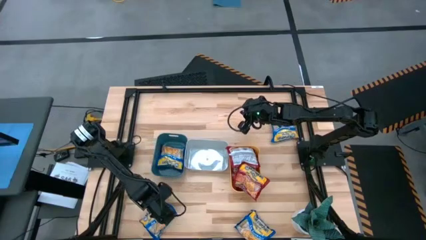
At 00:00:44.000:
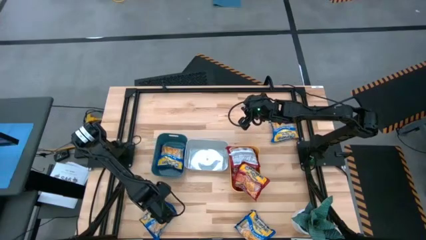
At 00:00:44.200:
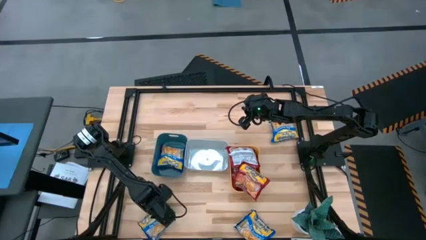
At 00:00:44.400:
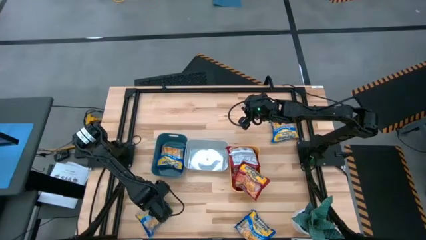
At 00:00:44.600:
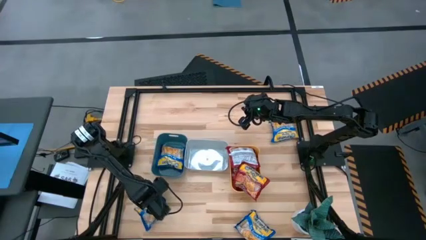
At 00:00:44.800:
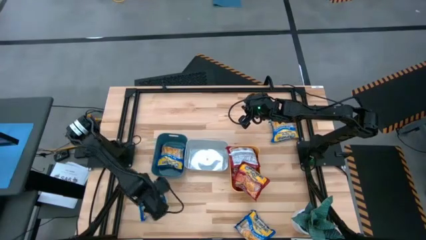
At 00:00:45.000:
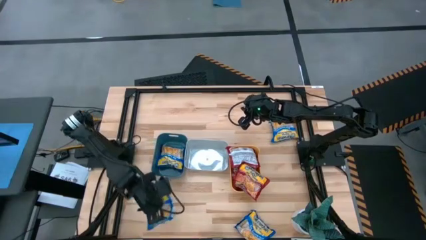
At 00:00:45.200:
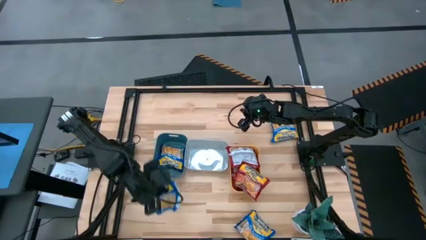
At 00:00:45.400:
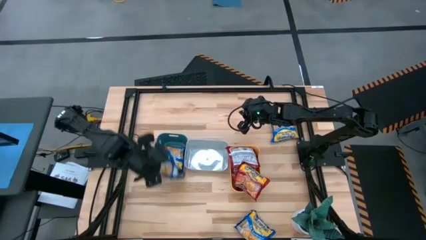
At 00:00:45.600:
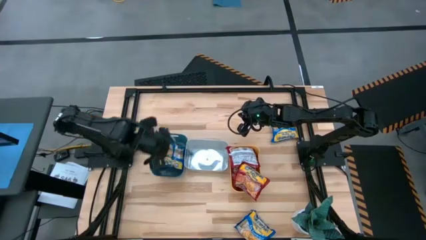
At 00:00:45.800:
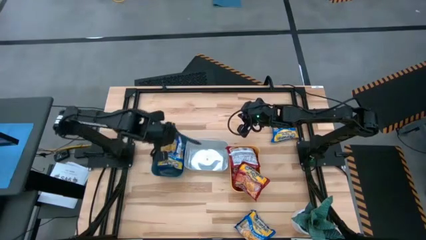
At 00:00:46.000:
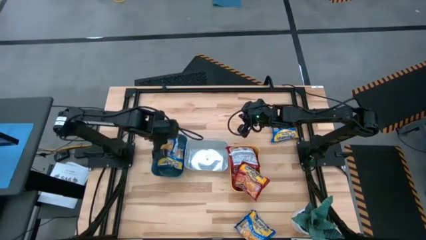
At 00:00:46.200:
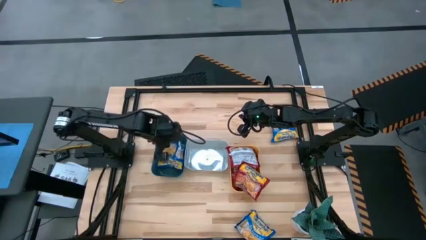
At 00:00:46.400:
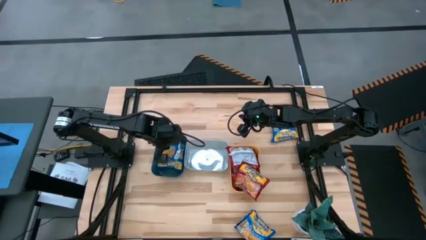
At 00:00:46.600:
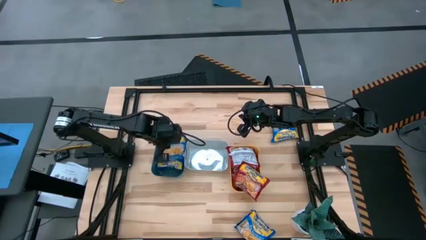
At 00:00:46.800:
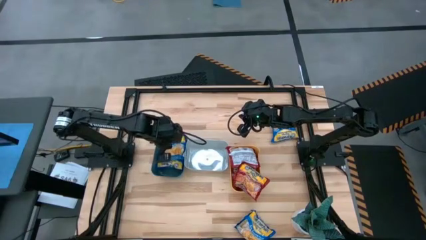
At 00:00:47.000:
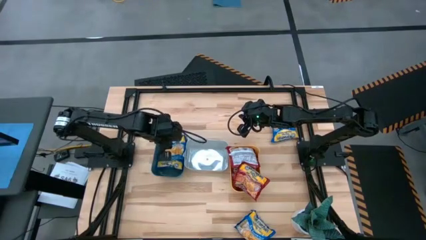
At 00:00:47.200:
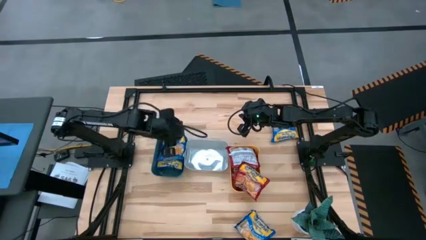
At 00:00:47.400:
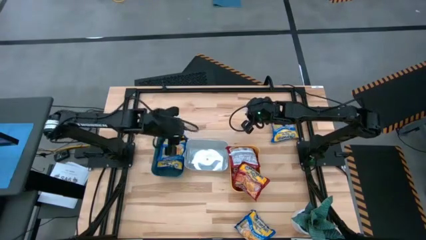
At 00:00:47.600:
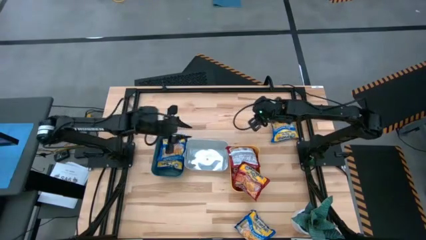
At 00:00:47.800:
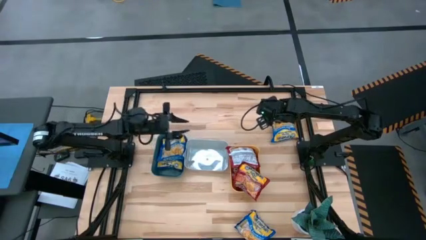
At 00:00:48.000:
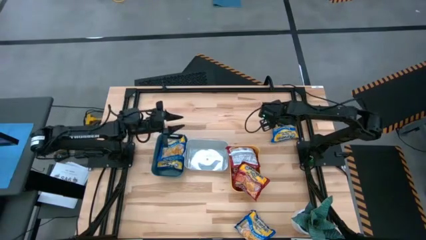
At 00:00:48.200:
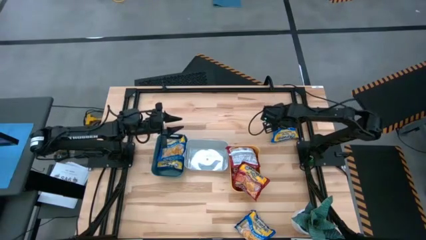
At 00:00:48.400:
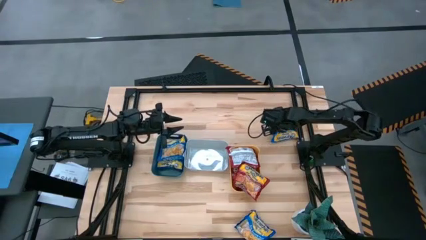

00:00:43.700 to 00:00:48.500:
Task: Sort Maruchan noodles
Put the left blue noodle pack into the green bin

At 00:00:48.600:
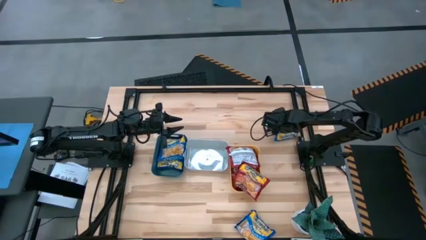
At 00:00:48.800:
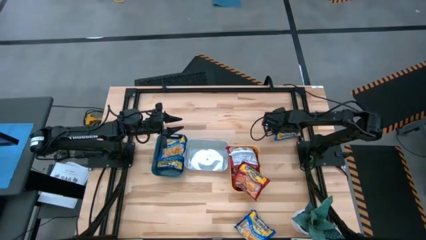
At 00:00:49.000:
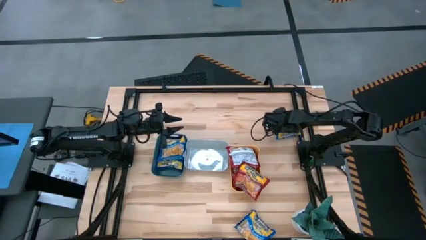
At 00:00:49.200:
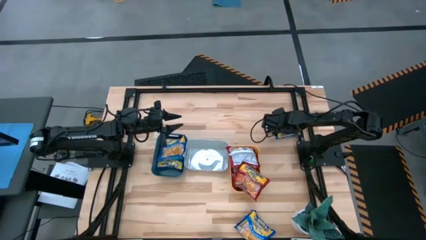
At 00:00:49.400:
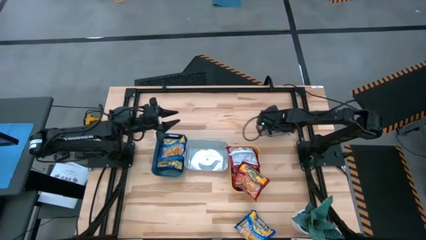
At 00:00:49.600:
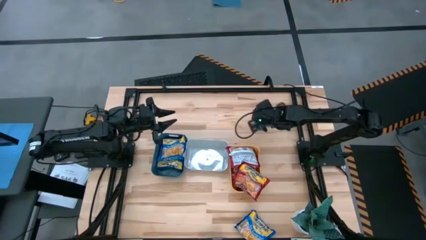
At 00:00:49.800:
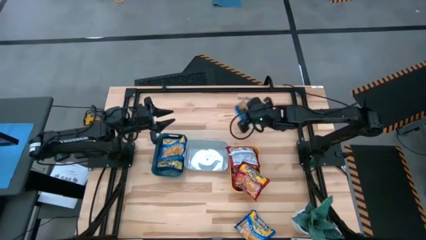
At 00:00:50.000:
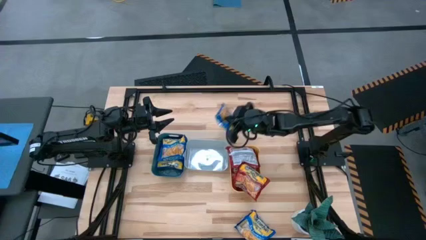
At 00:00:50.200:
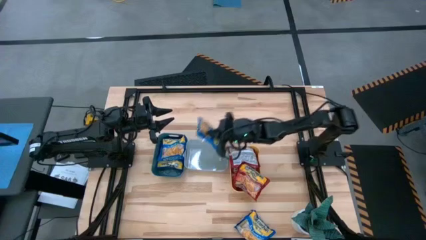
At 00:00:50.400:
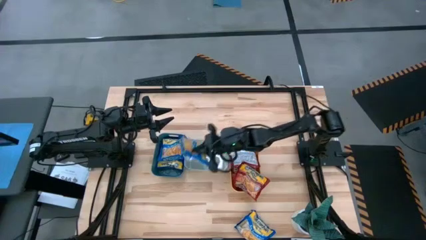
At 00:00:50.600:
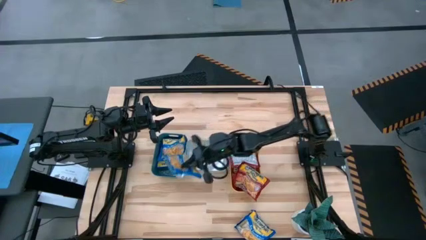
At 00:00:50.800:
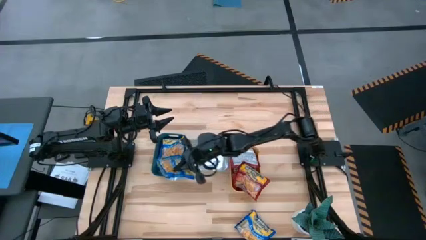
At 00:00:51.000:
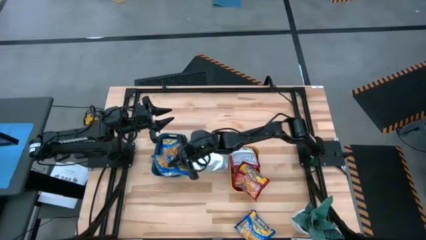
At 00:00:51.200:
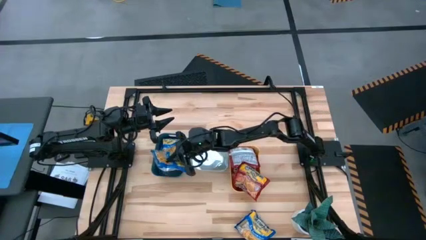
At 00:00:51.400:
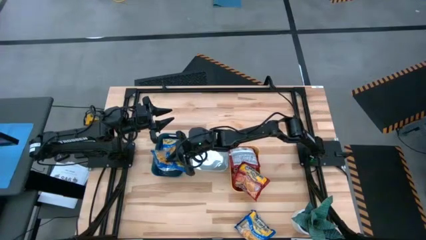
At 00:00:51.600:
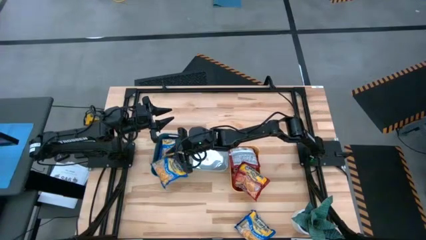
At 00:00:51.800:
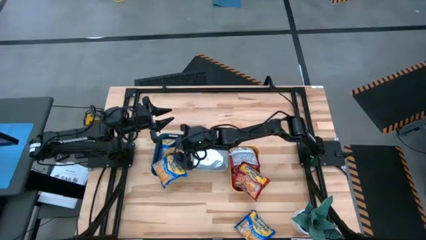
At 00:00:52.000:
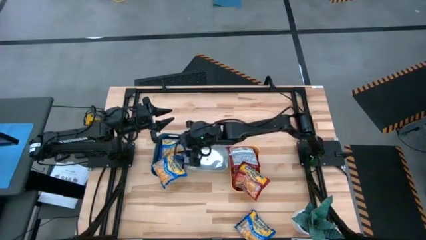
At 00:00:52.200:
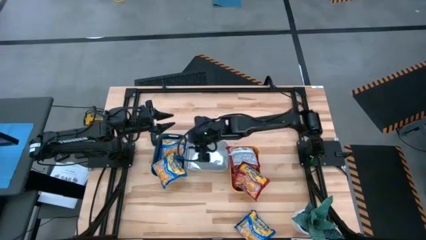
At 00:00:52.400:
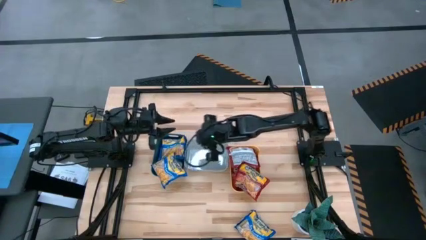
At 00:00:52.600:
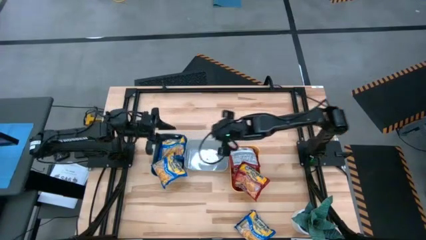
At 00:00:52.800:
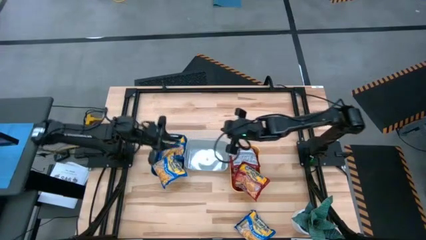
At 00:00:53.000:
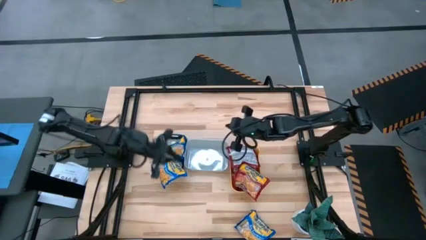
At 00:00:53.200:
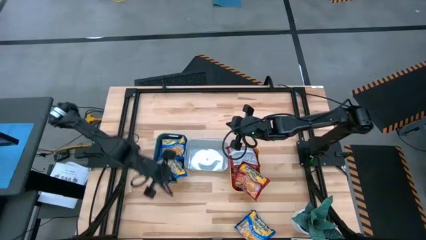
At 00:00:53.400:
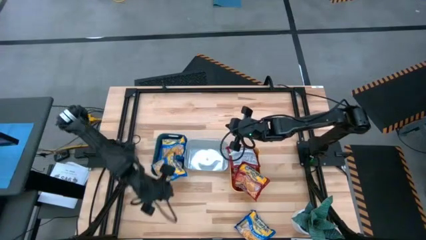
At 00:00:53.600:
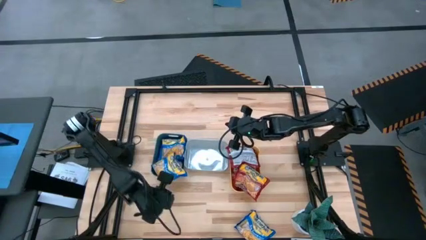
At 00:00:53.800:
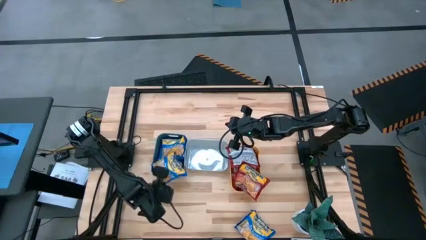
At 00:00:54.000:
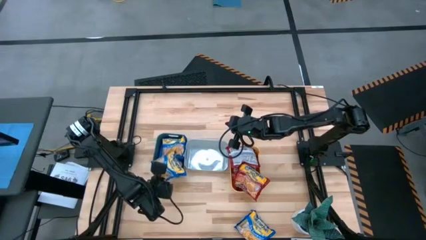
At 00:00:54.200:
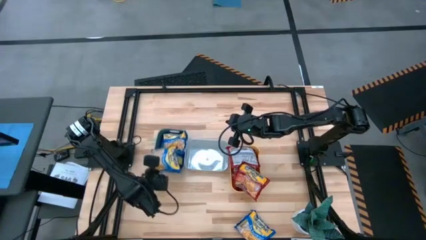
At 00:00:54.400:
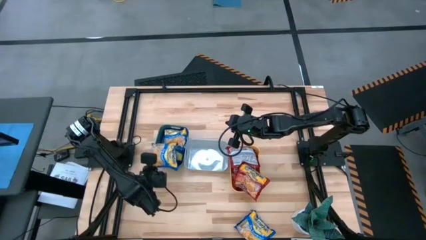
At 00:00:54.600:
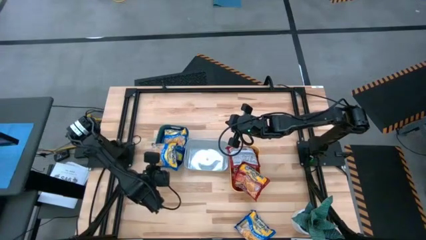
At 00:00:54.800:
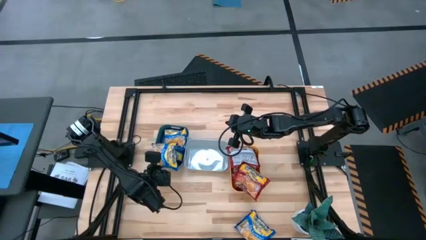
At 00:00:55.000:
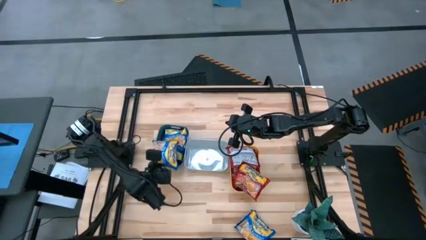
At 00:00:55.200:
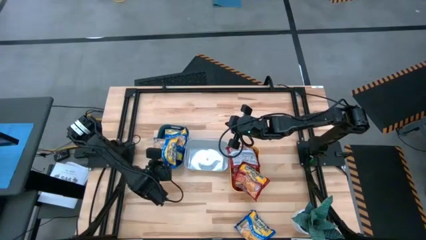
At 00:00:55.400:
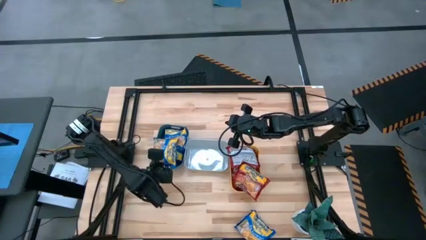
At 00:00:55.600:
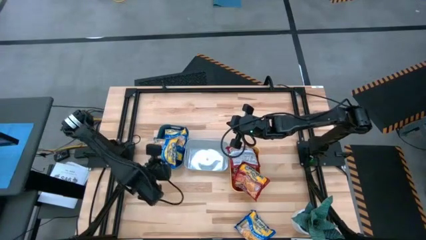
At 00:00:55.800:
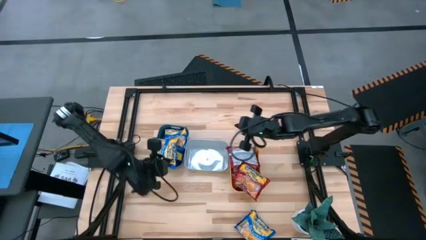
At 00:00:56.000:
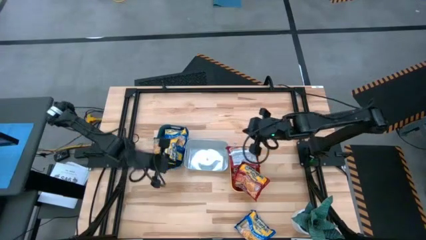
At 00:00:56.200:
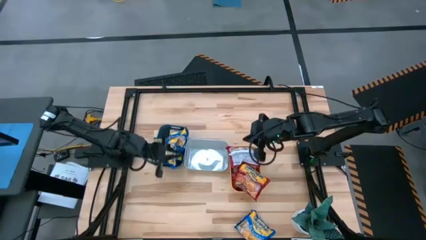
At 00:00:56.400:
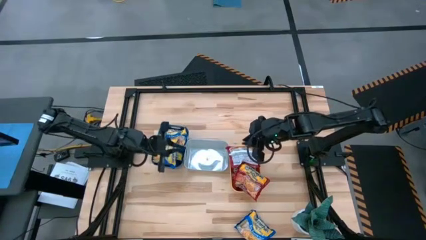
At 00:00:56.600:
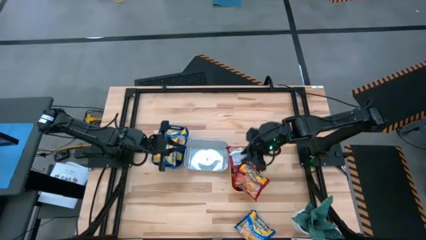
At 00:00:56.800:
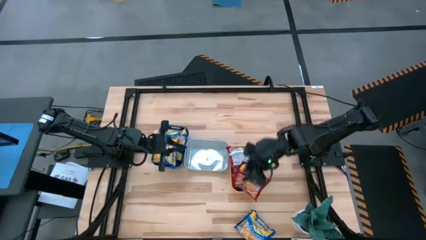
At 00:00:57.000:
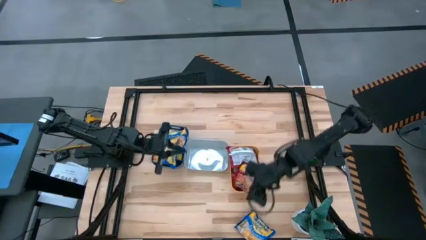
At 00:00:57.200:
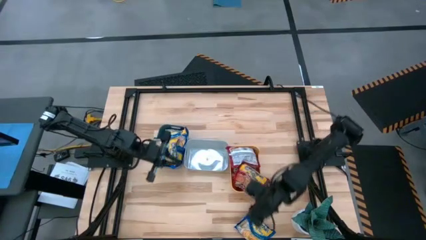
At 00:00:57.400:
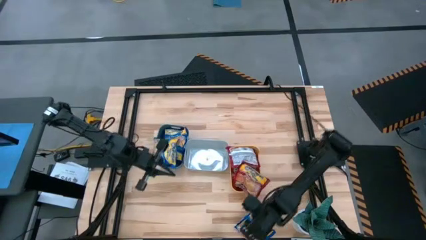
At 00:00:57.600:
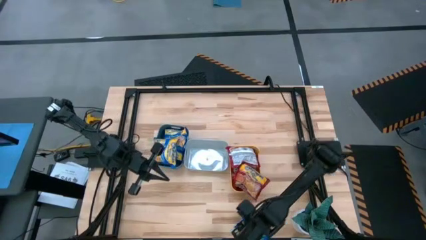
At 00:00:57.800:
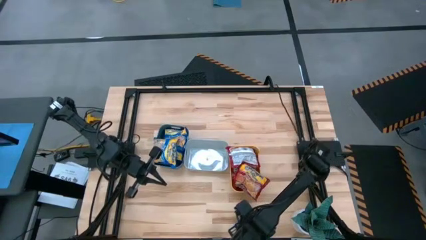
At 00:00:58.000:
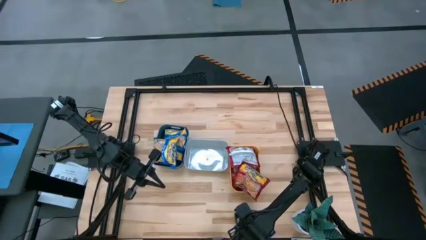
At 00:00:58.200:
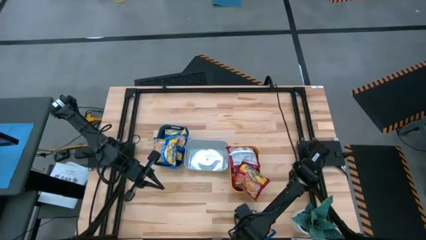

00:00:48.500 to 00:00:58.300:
Put the top blue noodle pack into the green bin

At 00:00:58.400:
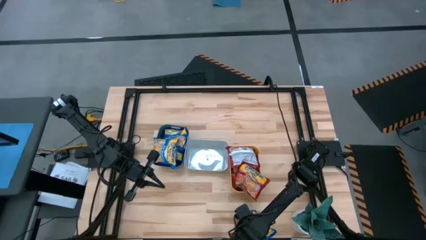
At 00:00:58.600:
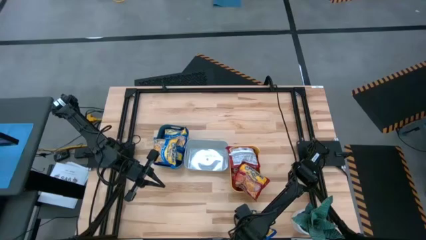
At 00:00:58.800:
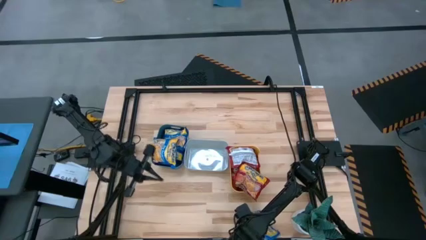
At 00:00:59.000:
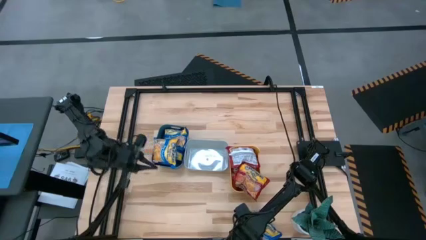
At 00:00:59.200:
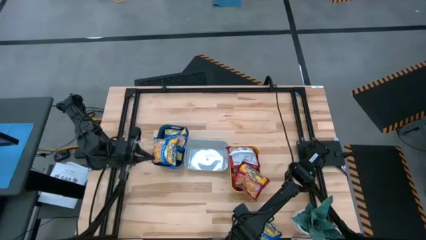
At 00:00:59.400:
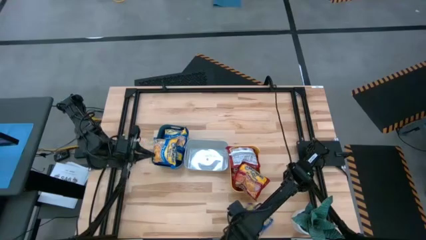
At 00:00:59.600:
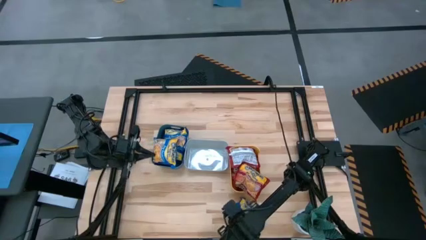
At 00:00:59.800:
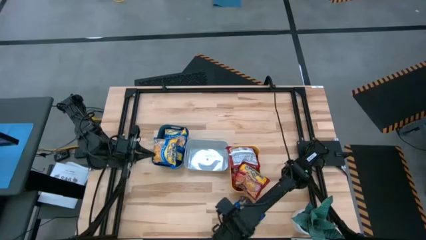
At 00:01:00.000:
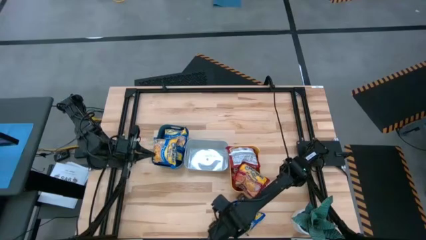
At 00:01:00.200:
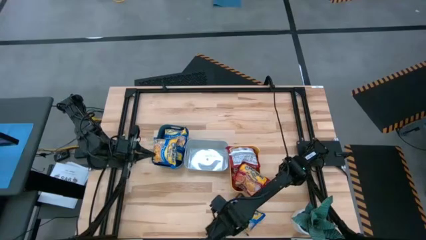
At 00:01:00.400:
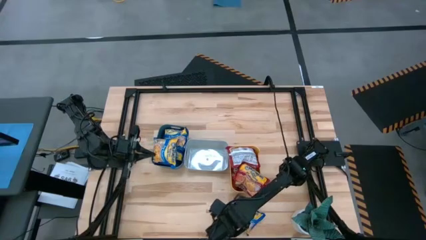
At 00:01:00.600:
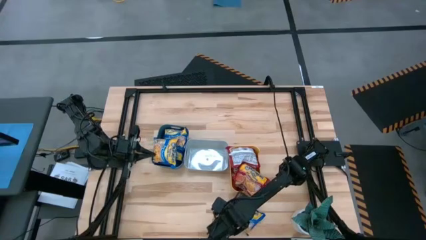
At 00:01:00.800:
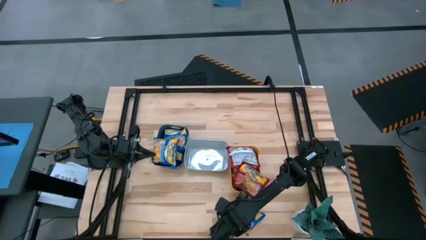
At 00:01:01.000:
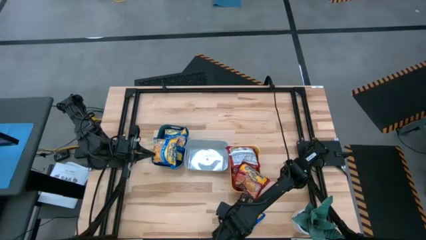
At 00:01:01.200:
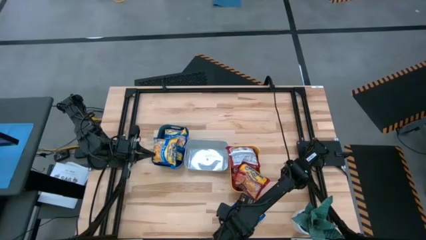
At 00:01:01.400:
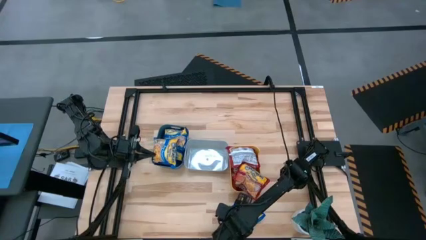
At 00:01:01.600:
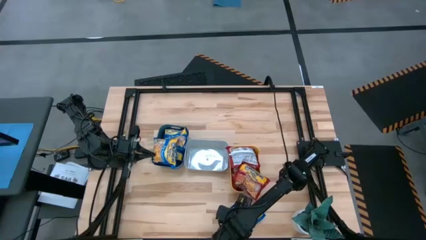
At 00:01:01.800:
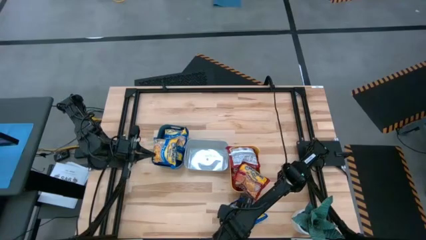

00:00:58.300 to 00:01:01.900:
Put the blue noodle pack into the green bin
